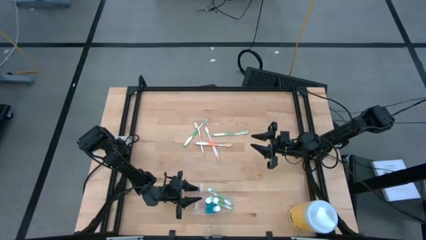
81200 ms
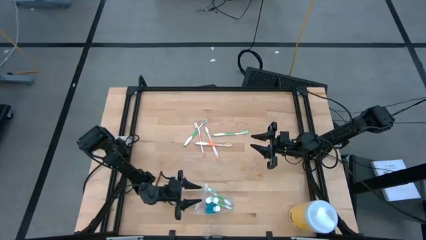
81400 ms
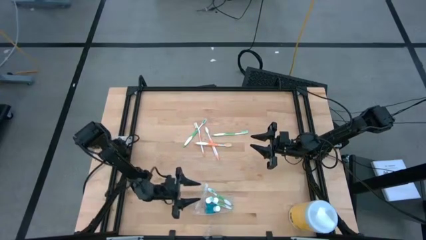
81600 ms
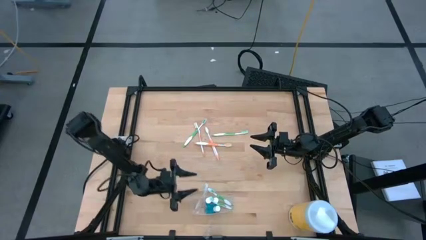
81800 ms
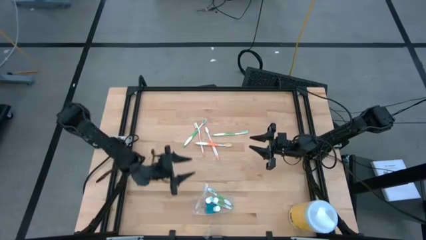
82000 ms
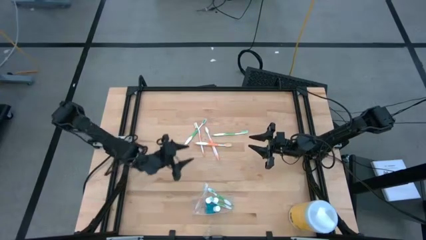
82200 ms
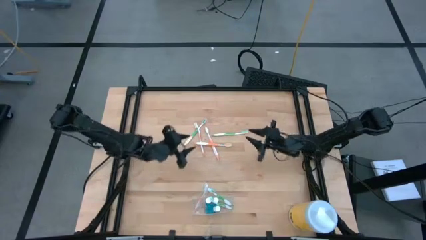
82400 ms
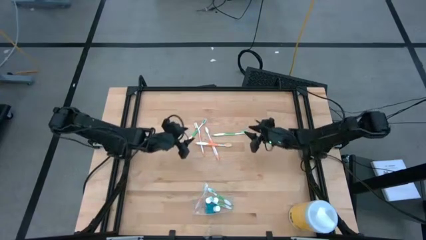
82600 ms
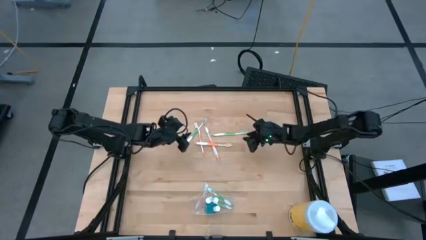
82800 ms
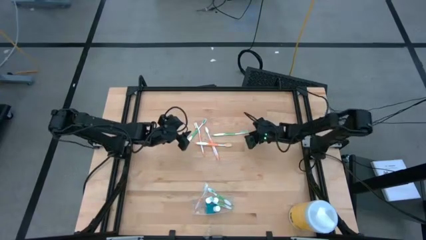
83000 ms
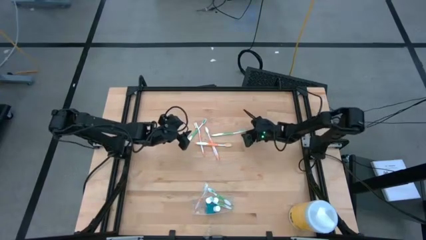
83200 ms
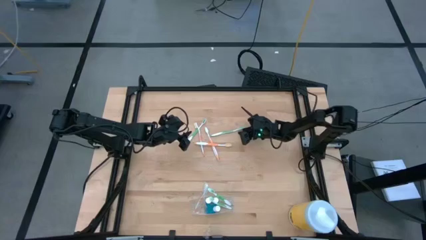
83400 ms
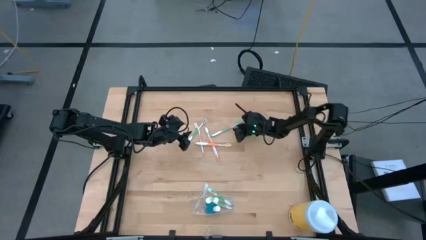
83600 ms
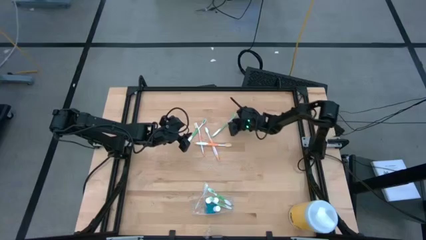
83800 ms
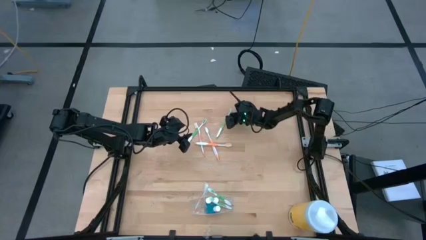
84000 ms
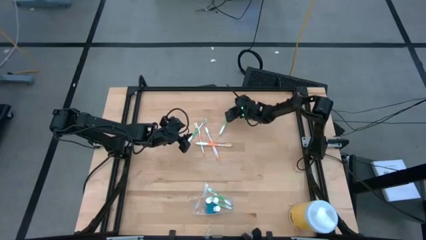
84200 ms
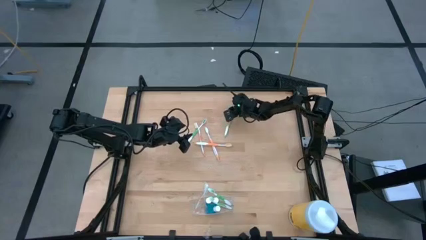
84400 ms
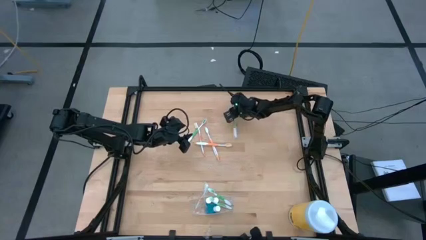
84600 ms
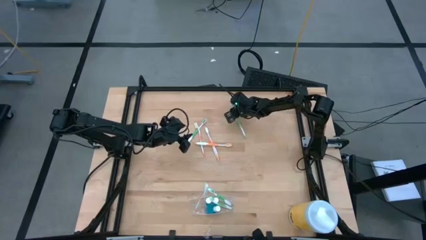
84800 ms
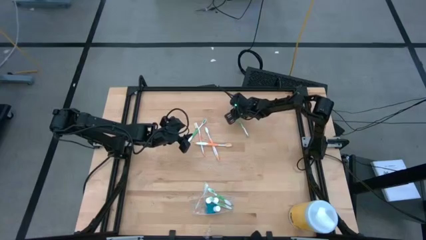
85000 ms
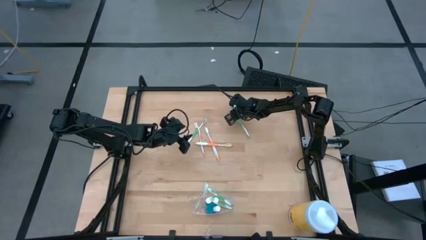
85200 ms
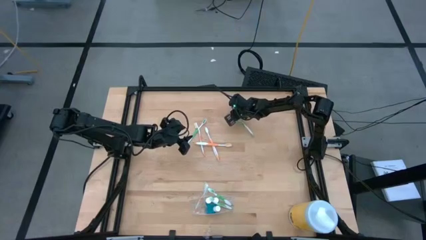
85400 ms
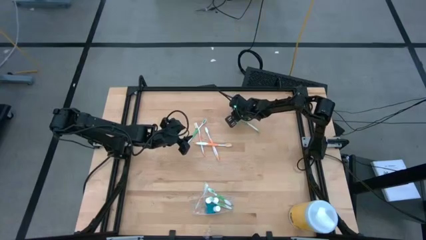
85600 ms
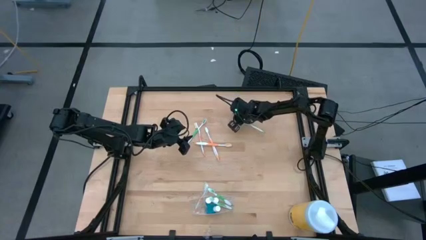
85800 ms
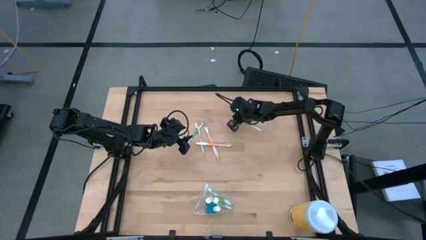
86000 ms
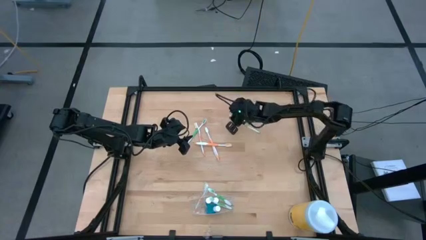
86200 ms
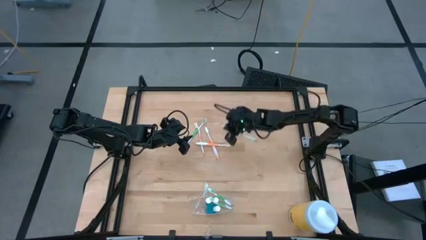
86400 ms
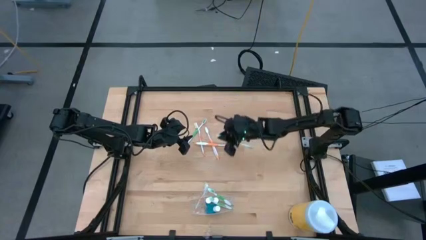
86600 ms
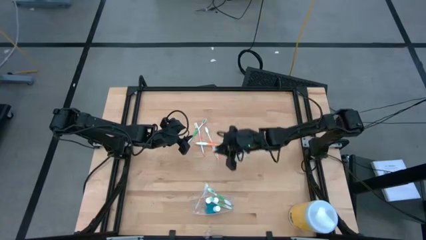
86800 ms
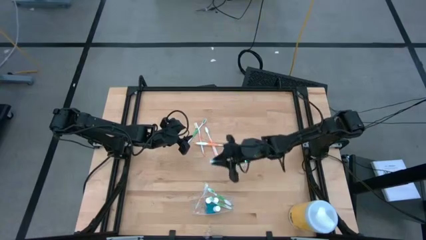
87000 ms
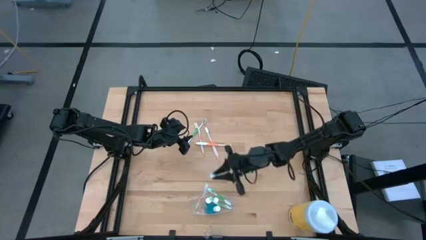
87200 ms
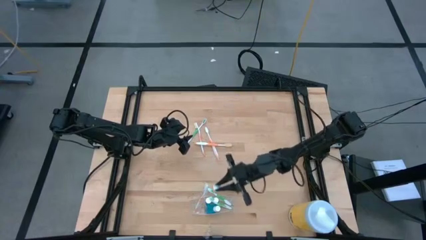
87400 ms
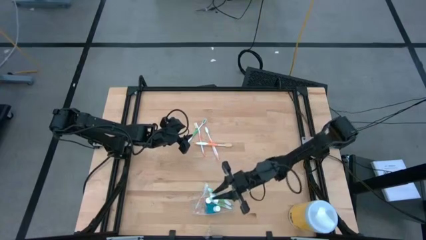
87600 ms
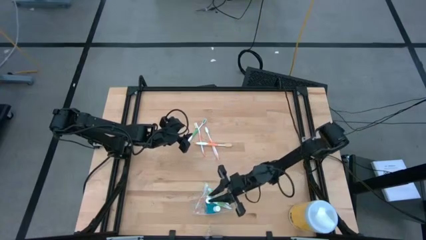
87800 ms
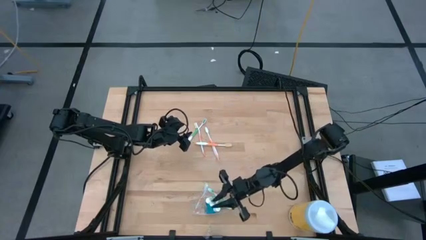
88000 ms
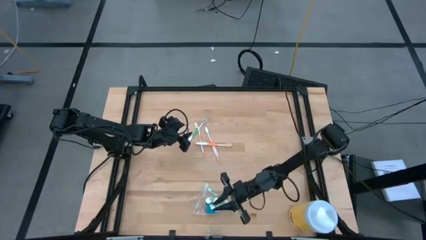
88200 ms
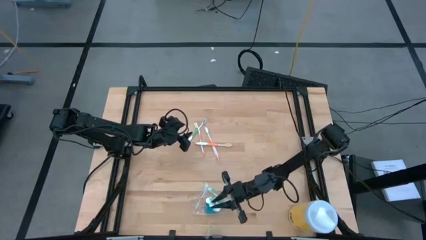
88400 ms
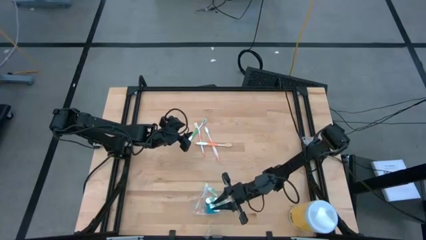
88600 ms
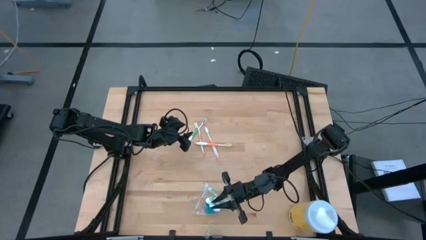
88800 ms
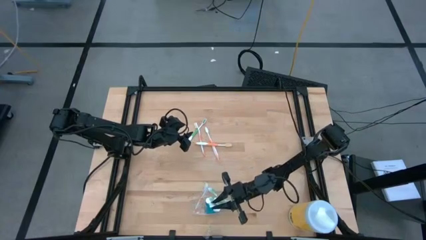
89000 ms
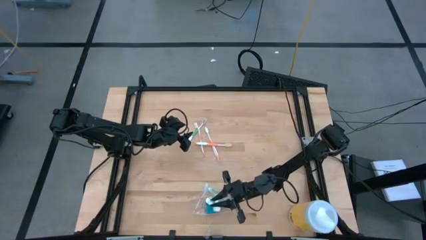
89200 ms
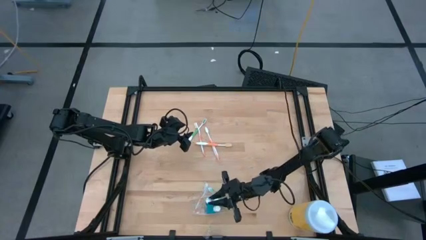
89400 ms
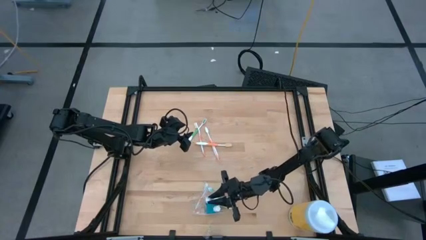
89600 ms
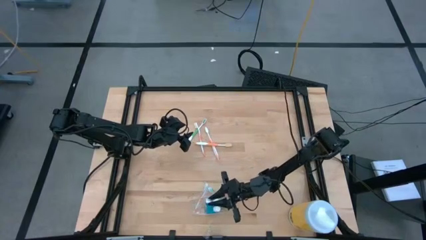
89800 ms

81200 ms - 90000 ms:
Task: Pick & Place toothbrushing station
Put the green toothbrush into the transparent organizer
